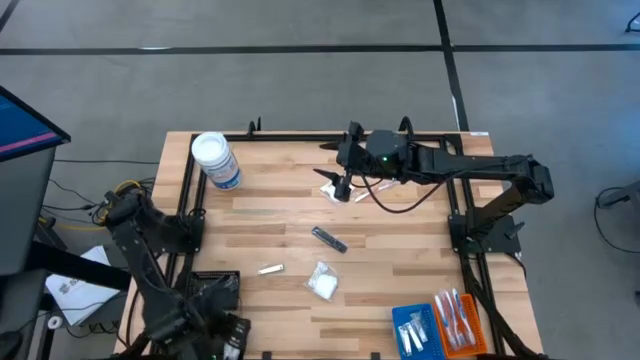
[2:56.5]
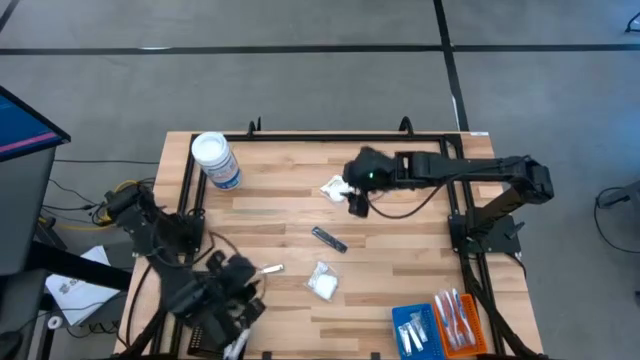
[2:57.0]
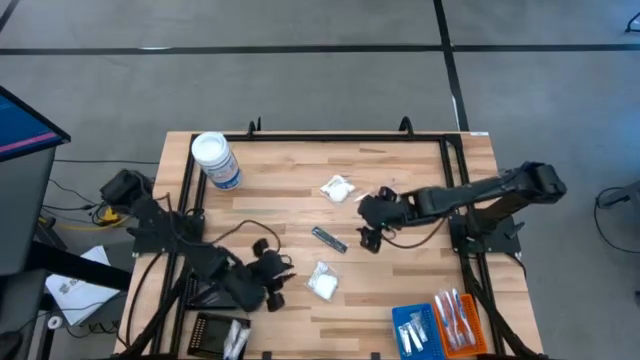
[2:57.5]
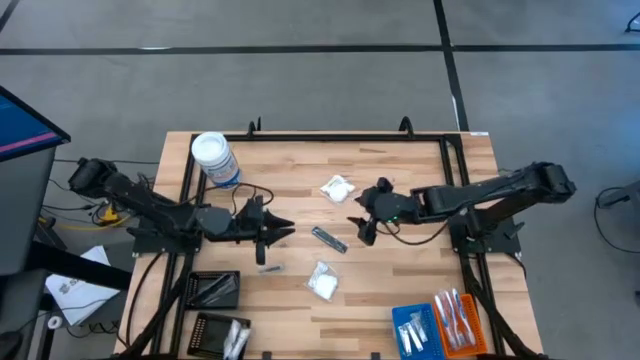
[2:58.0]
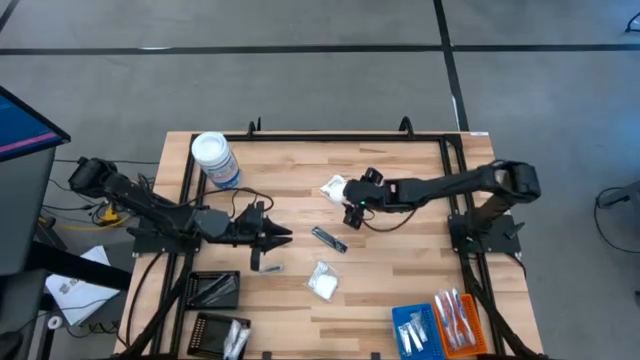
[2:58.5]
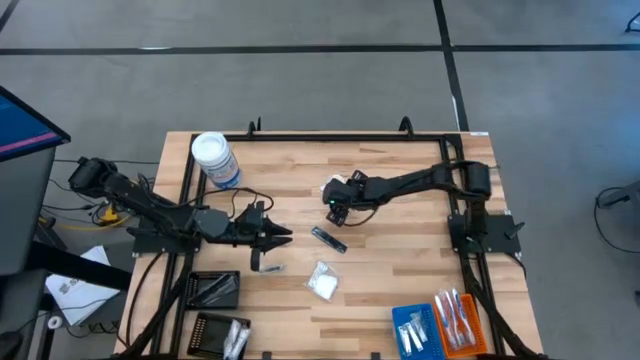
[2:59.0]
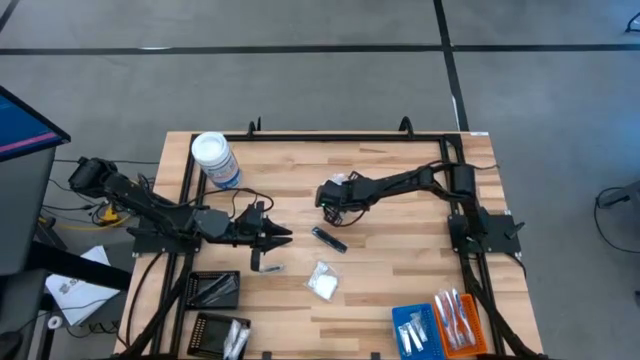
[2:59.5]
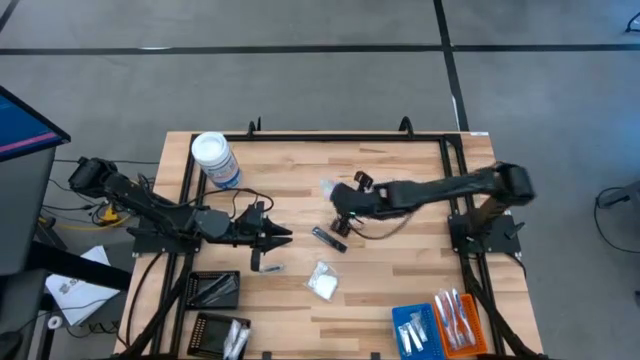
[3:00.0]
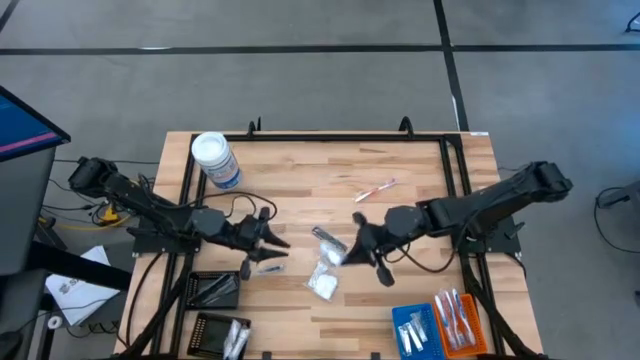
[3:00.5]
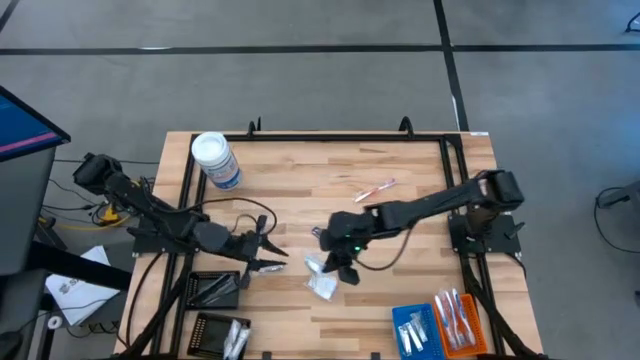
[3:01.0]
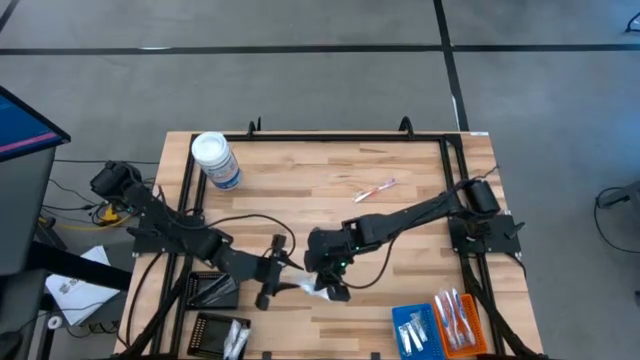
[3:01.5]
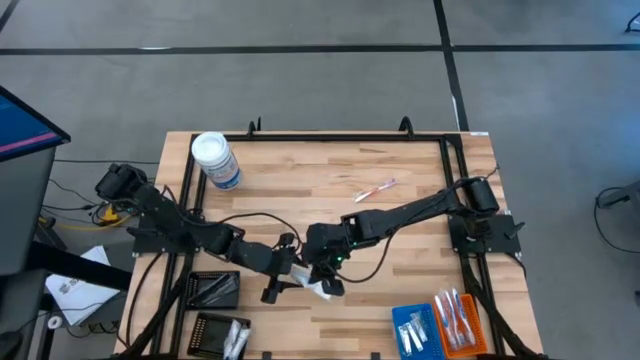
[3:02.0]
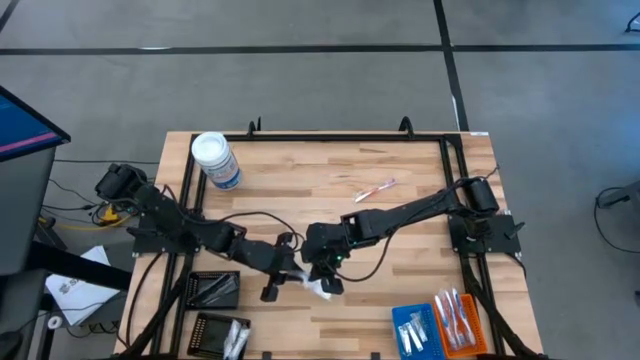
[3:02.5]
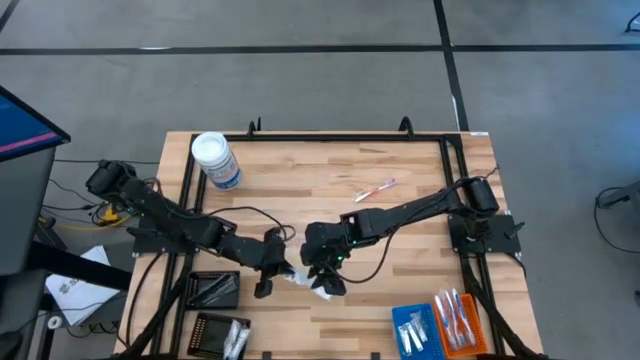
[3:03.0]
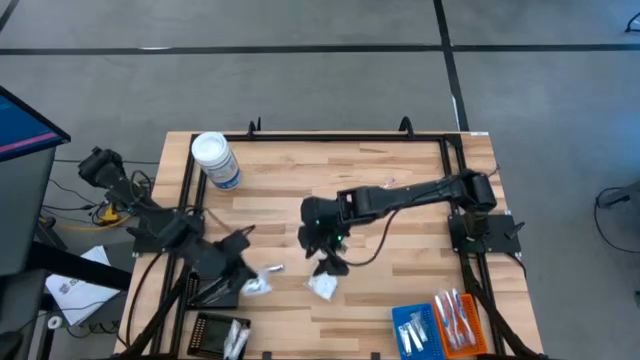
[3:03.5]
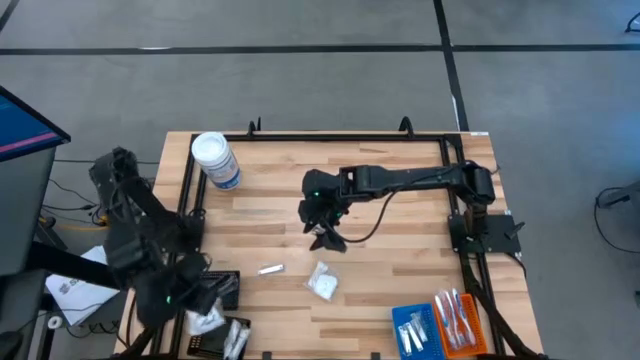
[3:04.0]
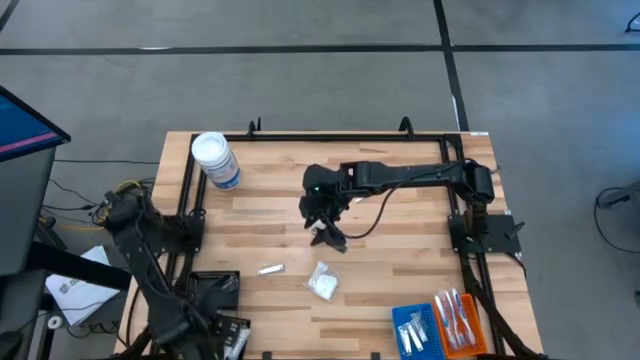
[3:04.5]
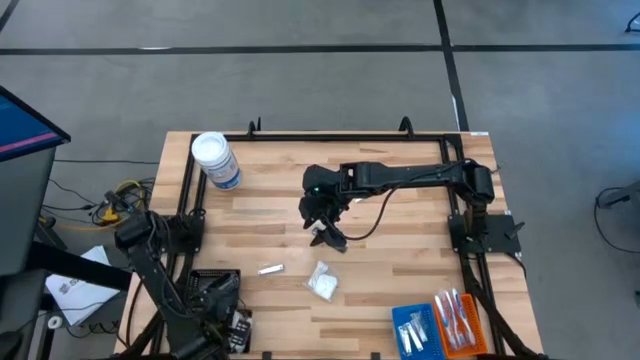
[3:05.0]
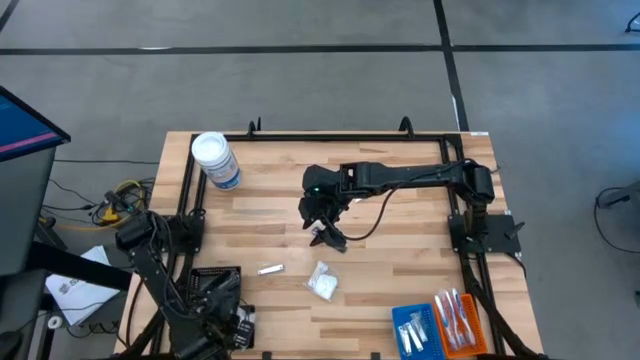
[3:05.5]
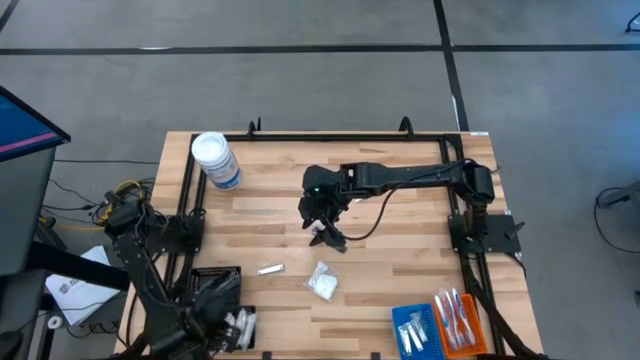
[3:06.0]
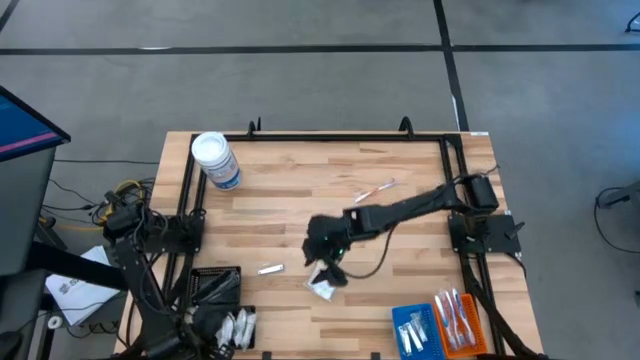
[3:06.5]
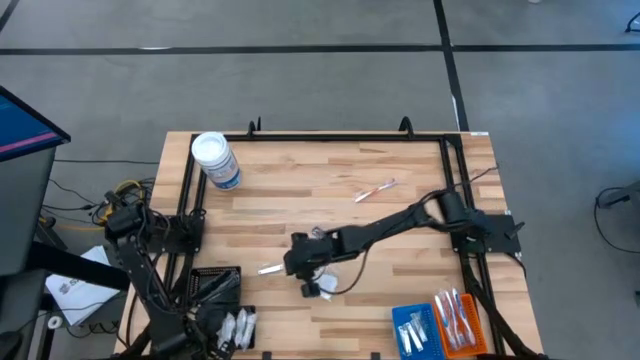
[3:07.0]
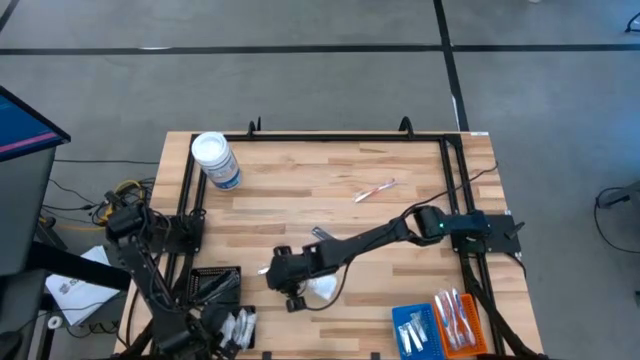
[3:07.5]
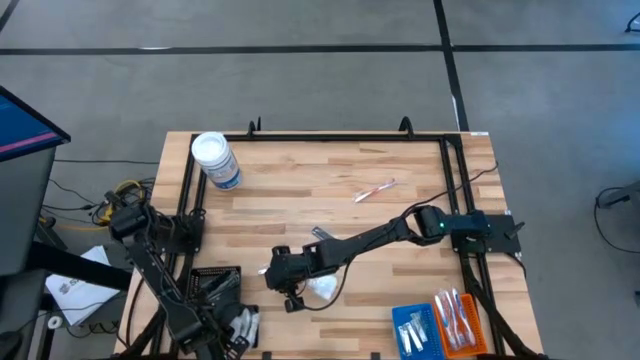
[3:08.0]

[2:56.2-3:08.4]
Task: Pick & Place Travel size toiletries
Put the vanity pack into the bottom black bin

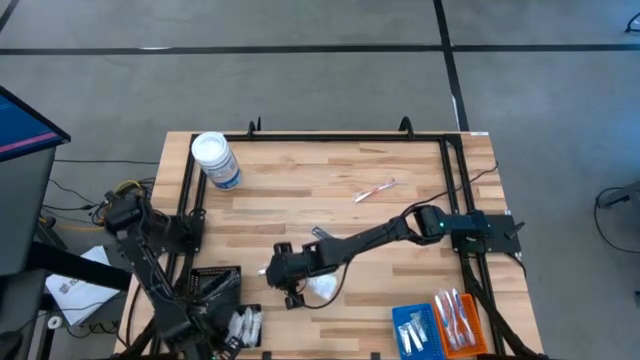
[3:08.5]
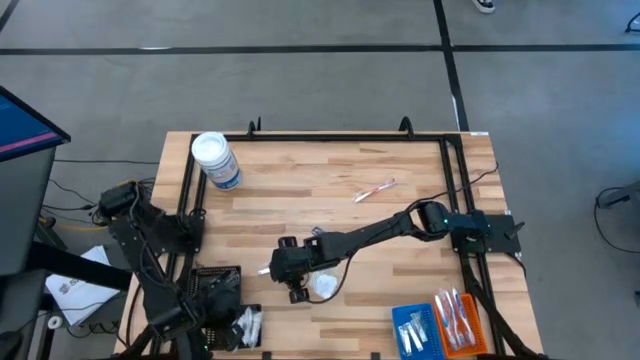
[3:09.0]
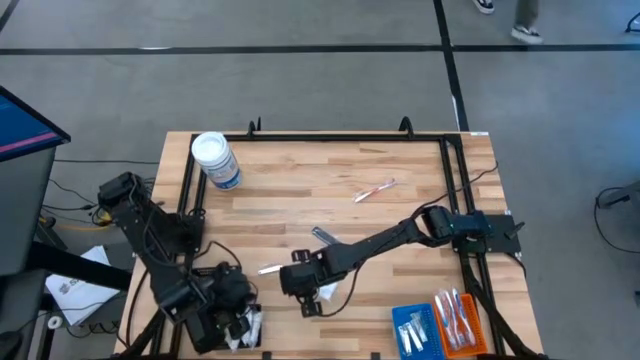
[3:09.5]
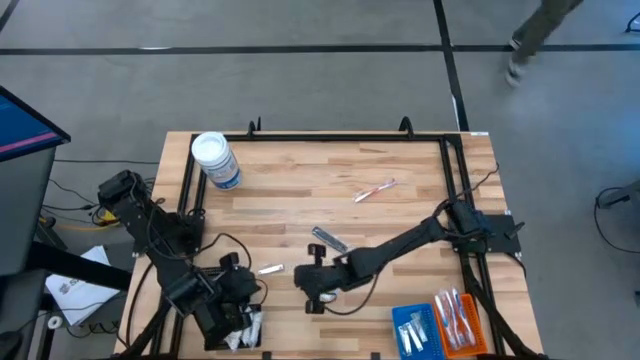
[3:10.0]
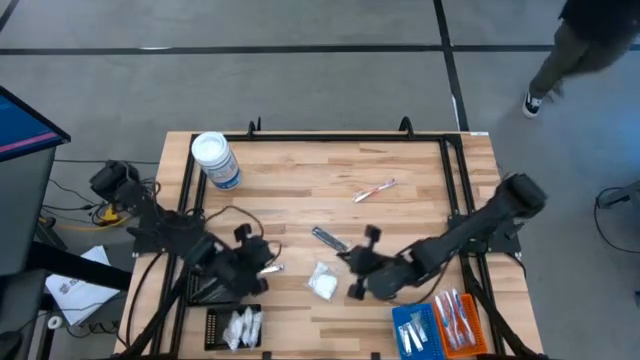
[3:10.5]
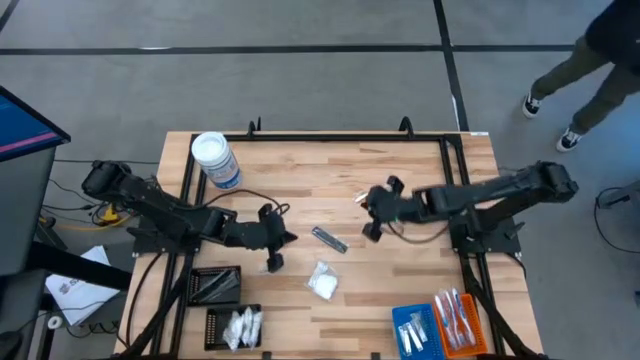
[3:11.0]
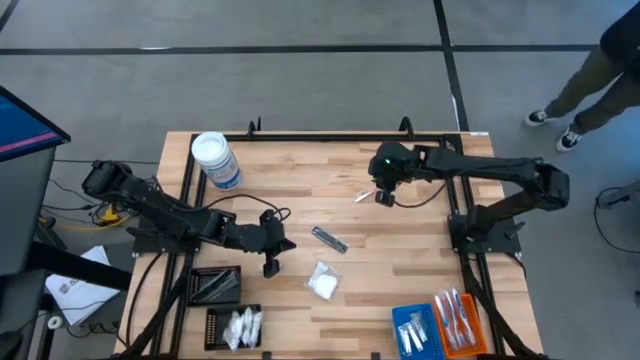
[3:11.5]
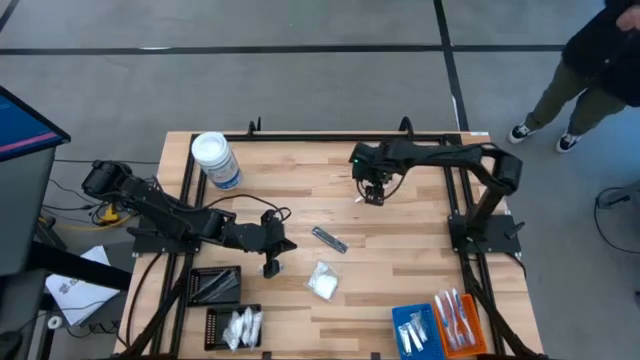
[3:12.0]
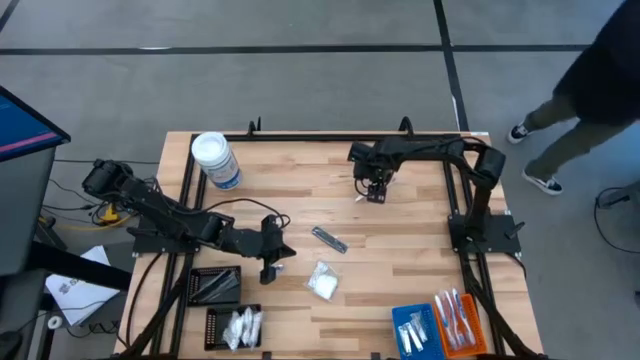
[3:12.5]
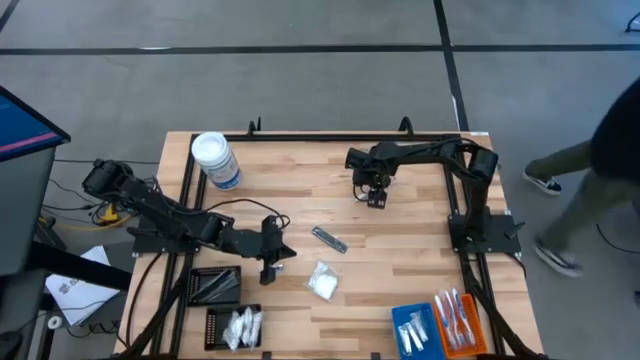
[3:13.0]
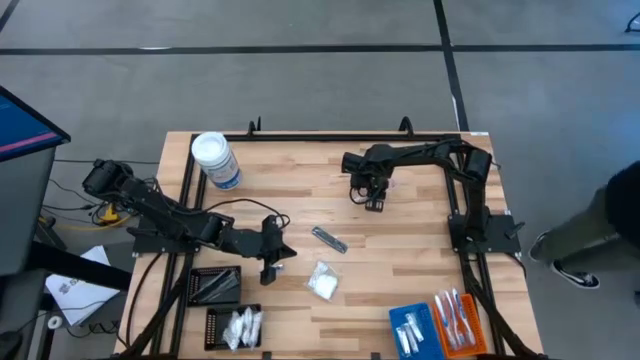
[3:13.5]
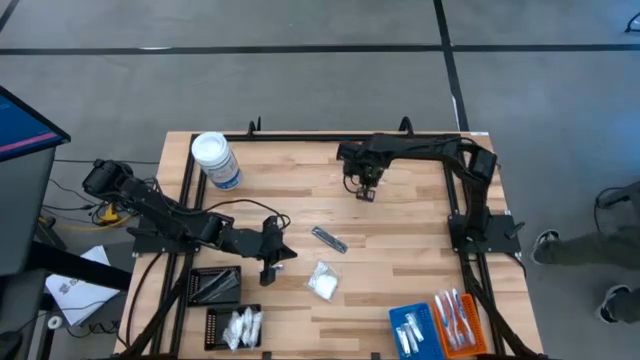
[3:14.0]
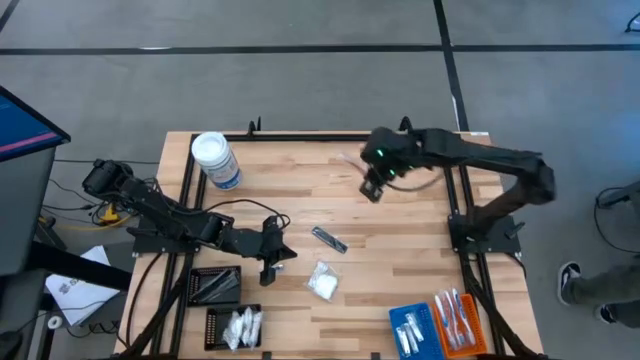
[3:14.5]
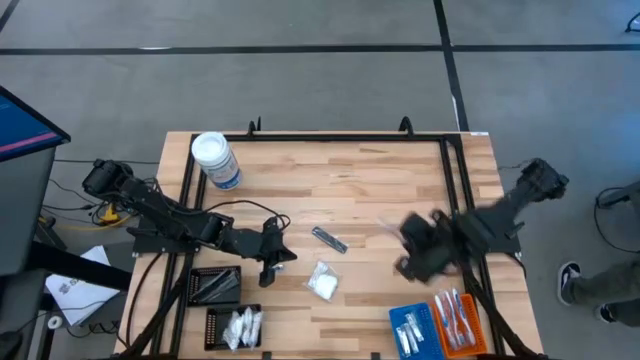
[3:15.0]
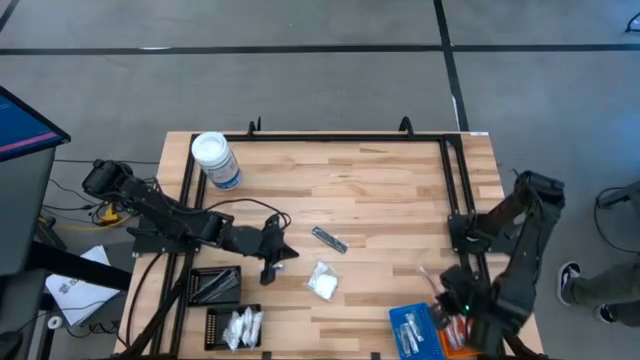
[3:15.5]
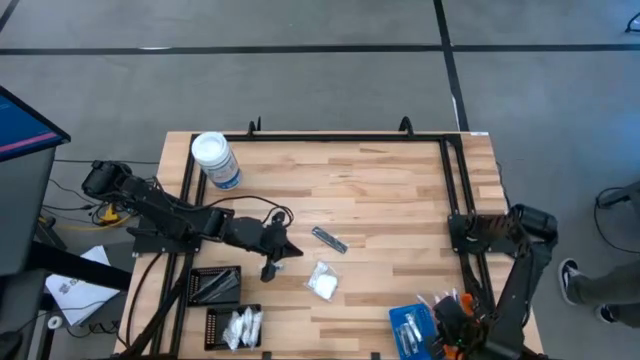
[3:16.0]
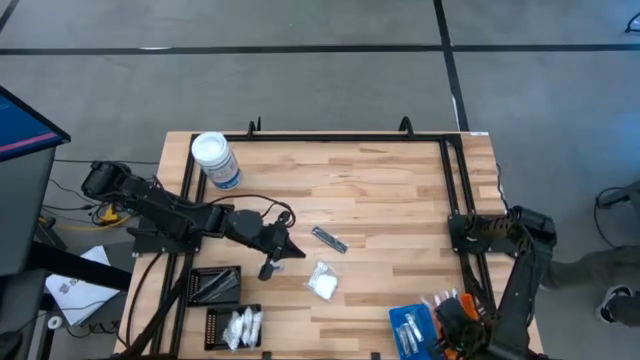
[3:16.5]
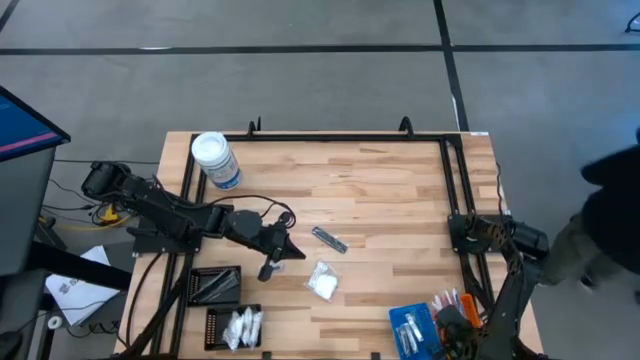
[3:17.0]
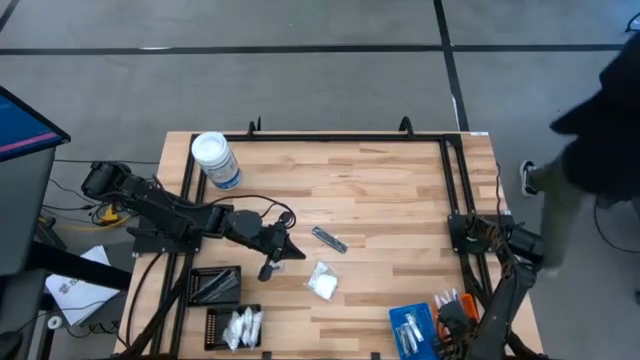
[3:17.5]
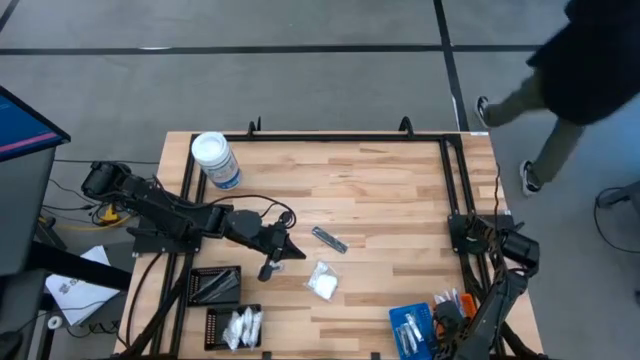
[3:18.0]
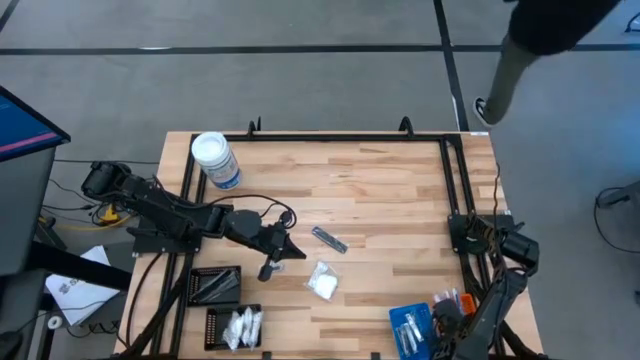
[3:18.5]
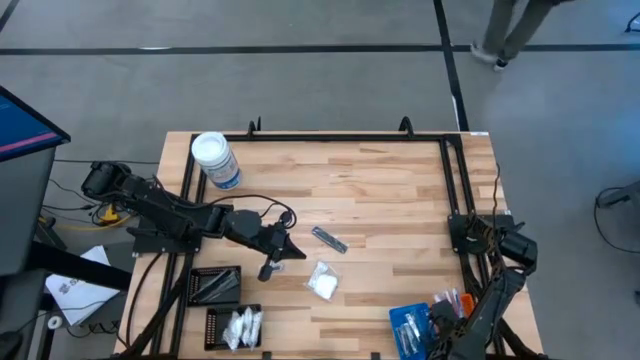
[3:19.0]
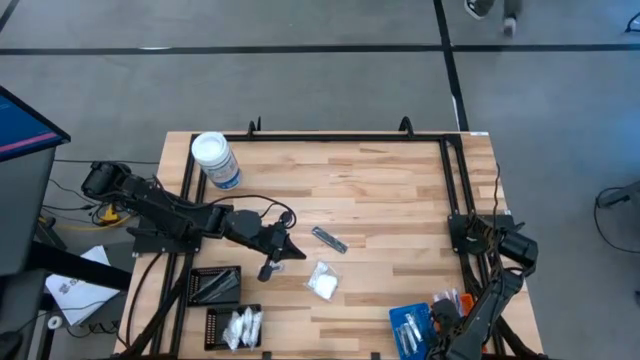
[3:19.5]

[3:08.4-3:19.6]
Put the red toothbrush into the orange bin
